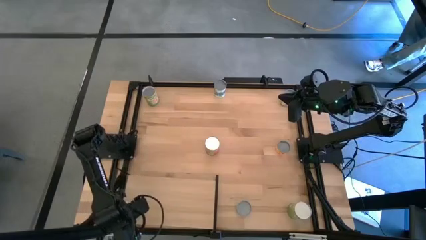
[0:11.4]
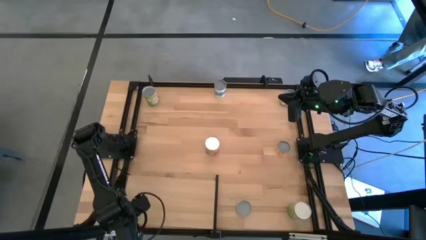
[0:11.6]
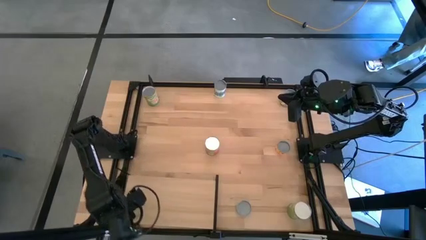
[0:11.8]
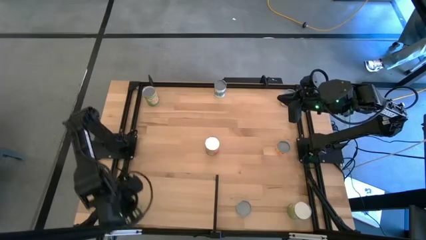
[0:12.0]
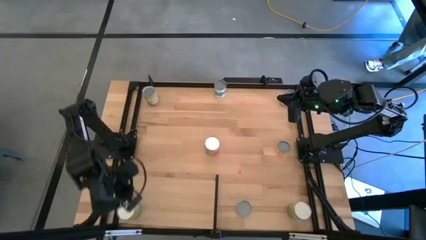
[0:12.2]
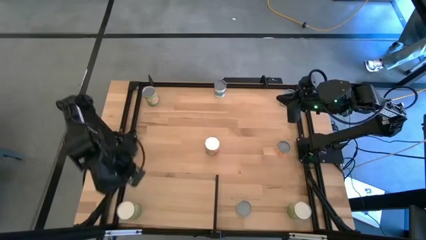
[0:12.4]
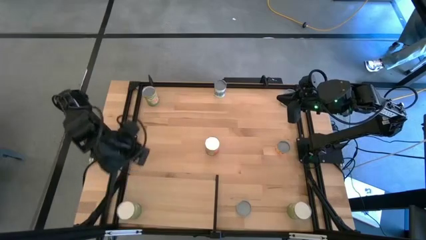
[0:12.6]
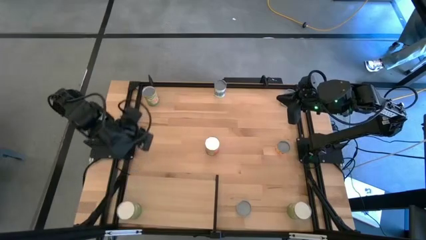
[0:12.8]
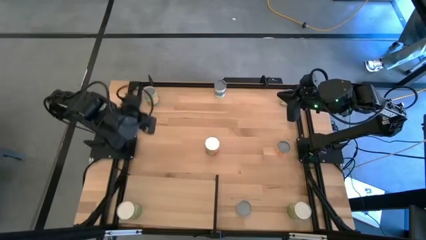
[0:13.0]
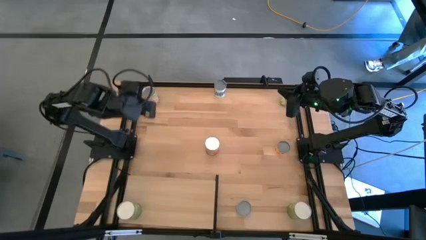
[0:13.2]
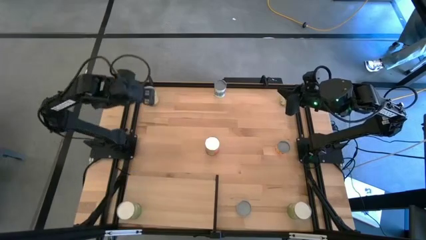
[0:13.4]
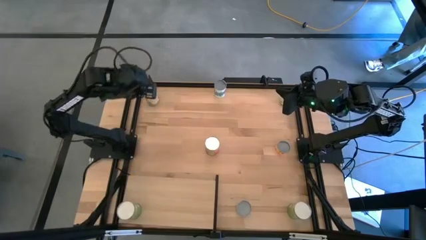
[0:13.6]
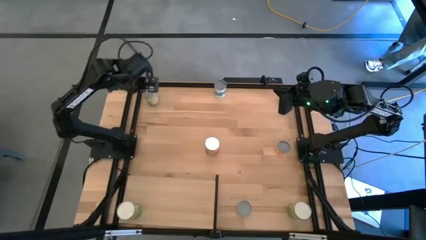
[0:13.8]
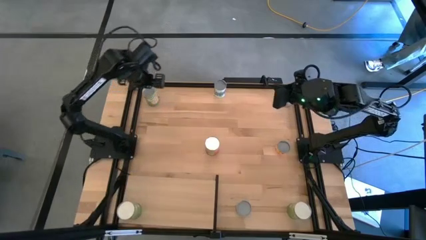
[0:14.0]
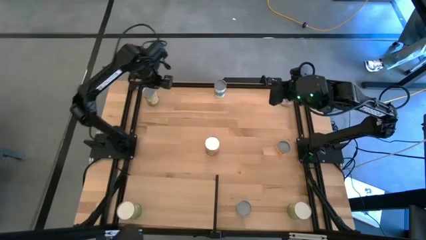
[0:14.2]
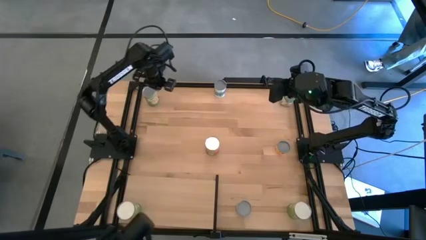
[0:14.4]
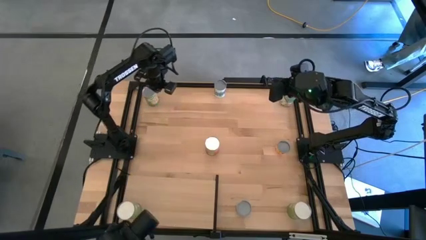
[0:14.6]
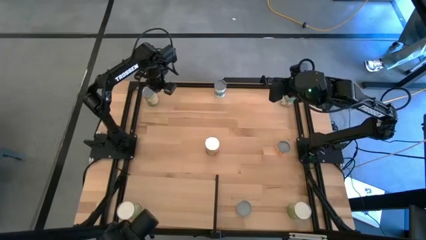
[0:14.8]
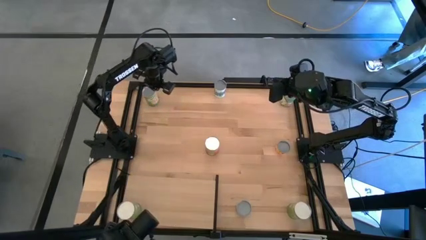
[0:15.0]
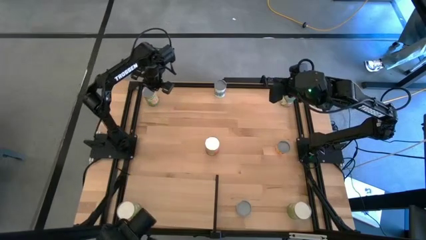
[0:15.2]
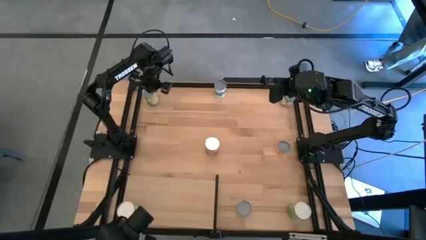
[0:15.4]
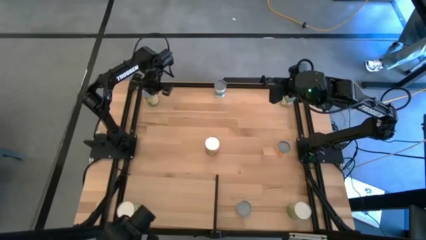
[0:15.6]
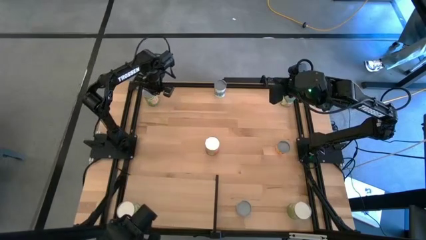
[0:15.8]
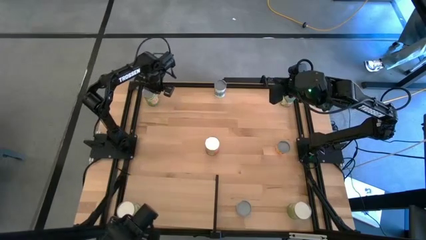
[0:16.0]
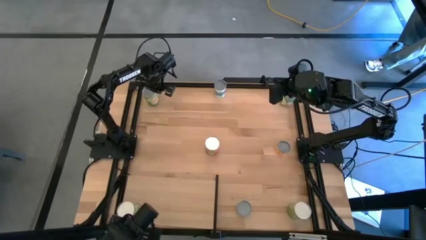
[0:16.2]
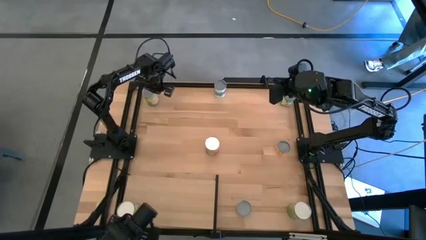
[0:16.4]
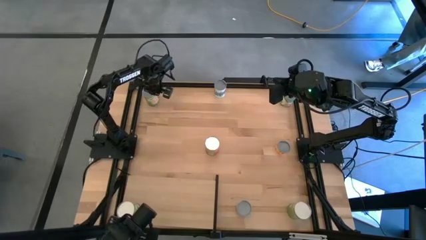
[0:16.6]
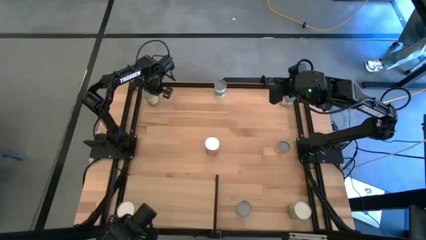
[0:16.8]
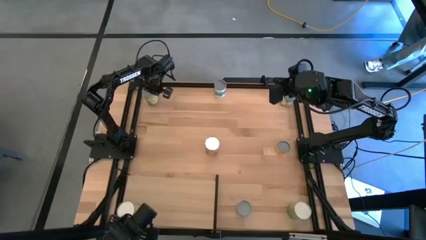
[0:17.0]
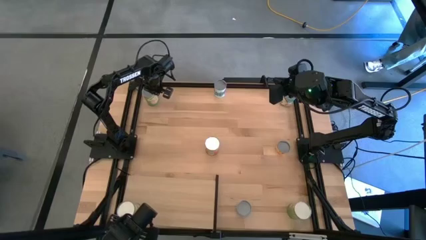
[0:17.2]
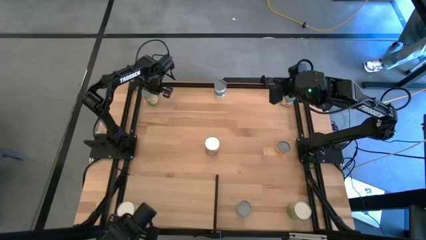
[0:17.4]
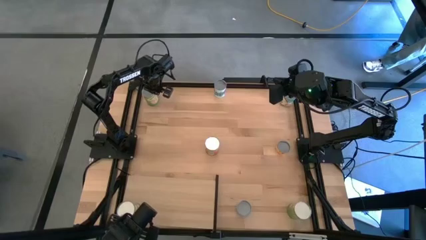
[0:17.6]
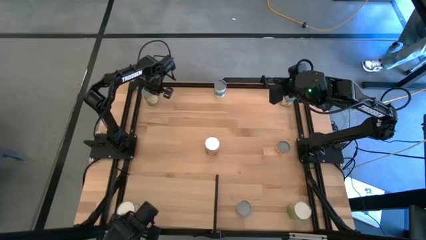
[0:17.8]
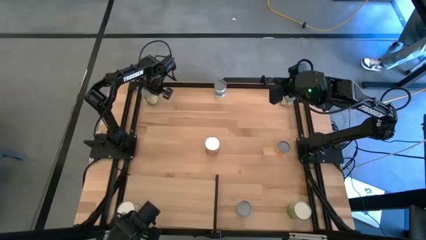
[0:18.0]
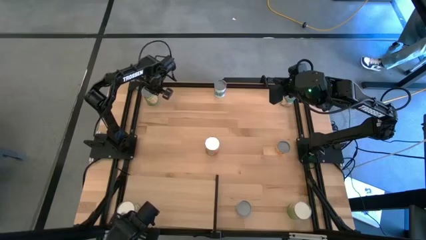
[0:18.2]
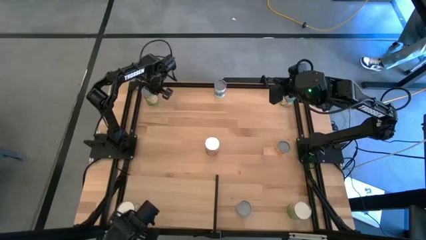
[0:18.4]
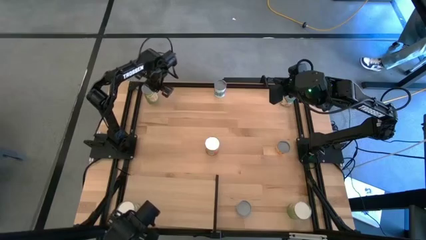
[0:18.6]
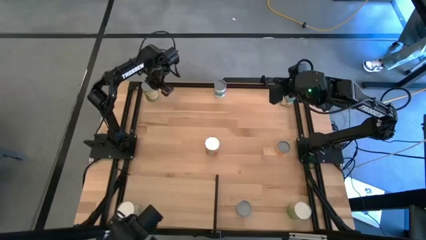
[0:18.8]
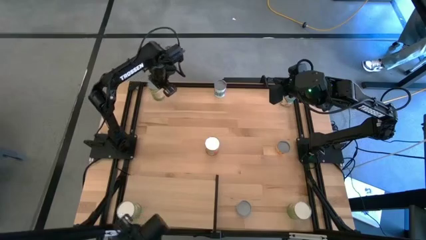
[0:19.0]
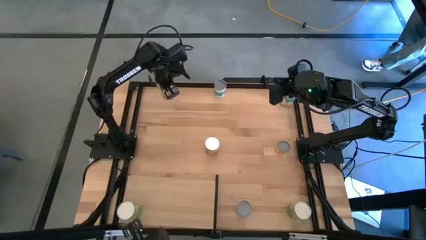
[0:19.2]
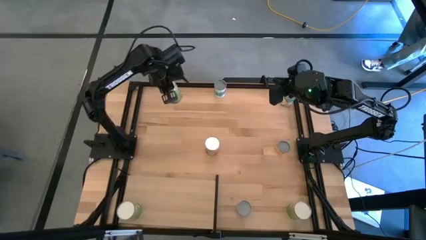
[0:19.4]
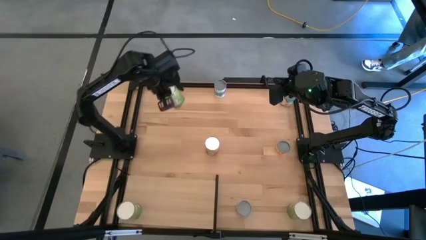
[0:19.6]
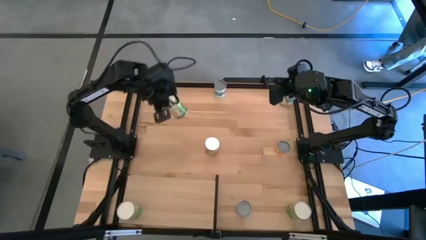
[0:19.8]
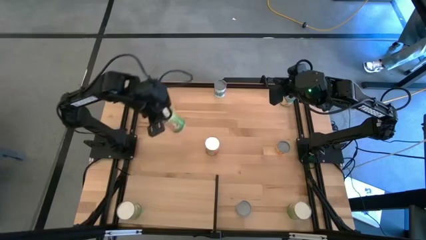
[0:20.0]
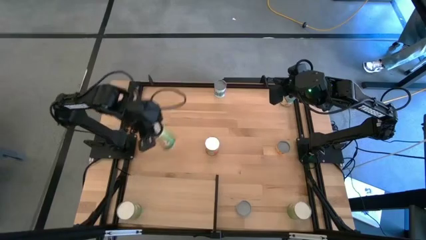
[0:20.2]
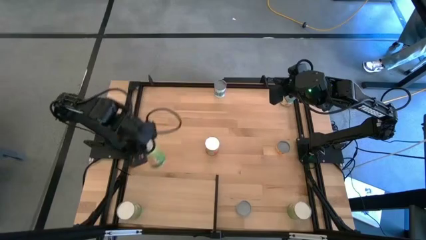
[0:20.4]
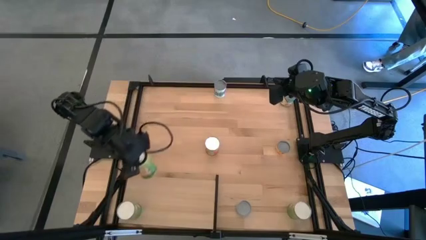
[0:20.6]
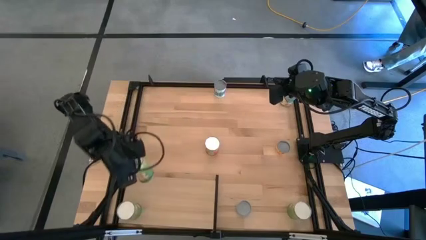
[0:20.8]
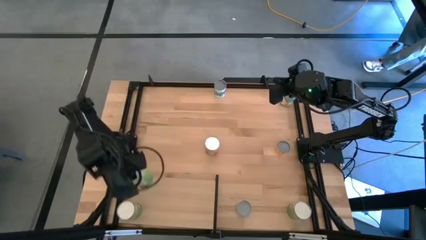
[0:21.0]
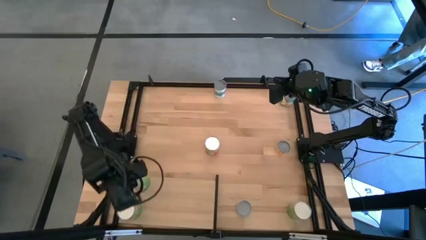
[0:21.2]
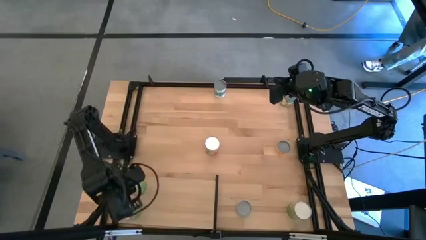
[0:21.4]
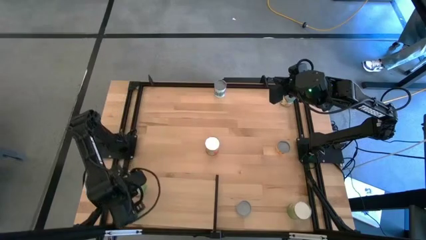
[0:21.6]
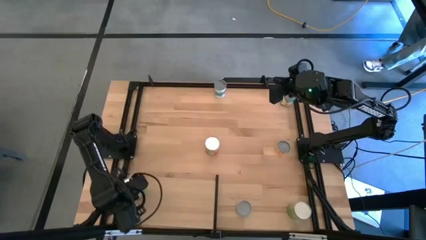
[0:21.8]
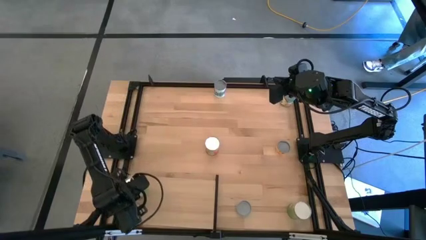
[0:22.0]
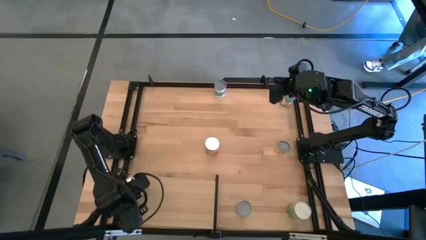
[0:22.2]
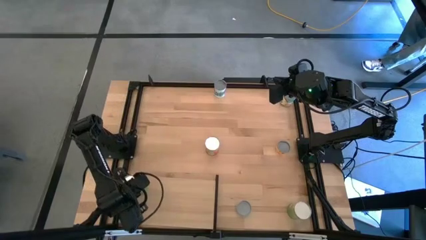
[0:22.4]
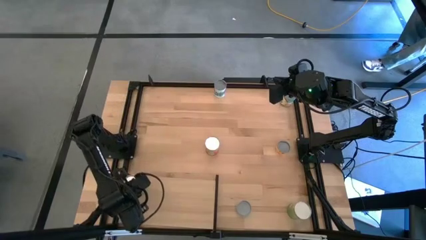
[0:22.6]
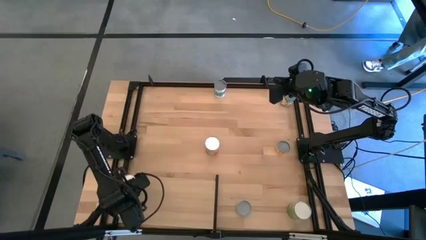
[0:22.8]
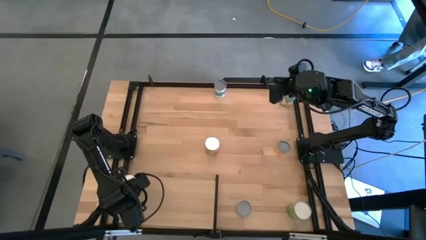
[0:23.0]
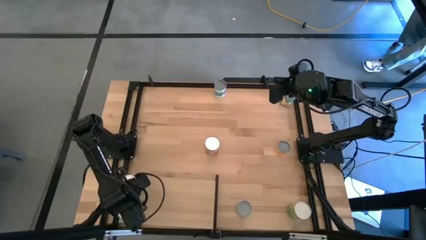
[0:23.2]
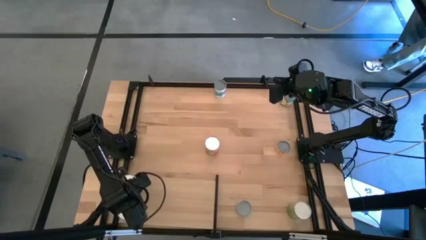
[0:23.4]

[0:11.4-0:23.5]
Task: Pick and place cans onto a shelf
Put the canned oranges on the shelf

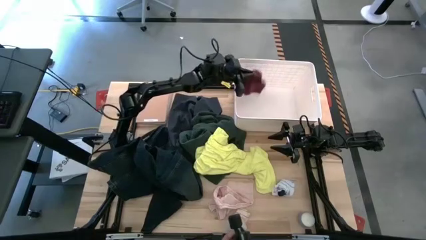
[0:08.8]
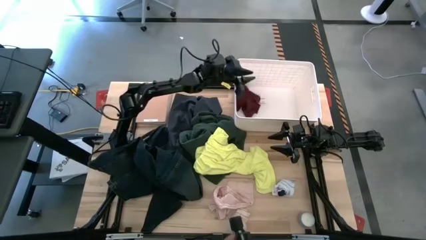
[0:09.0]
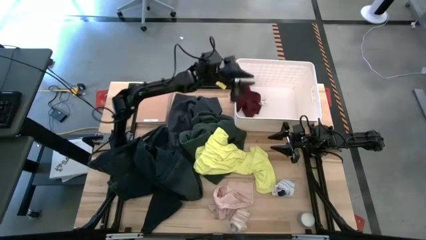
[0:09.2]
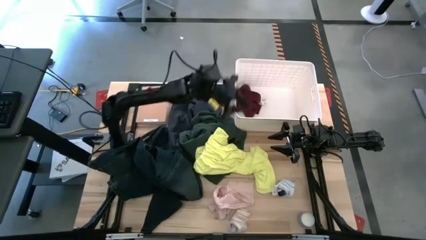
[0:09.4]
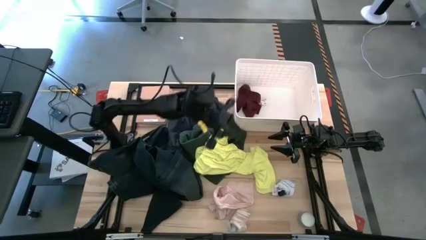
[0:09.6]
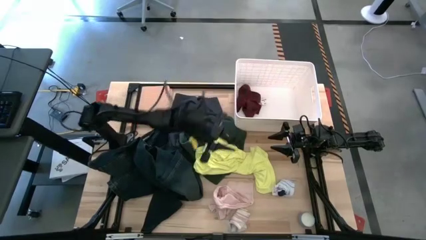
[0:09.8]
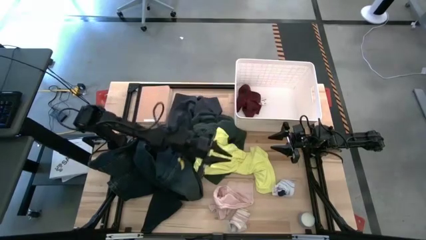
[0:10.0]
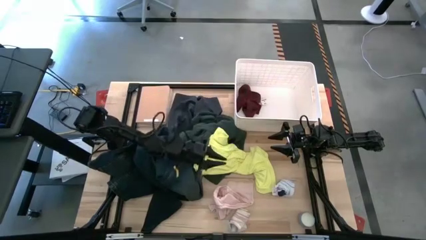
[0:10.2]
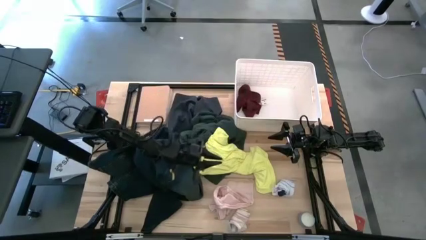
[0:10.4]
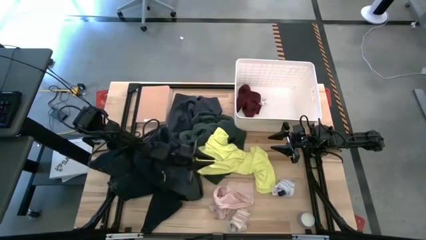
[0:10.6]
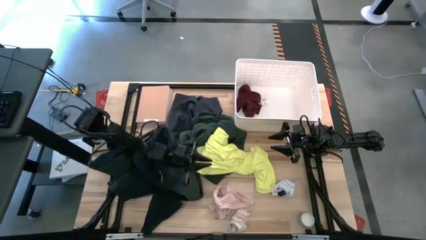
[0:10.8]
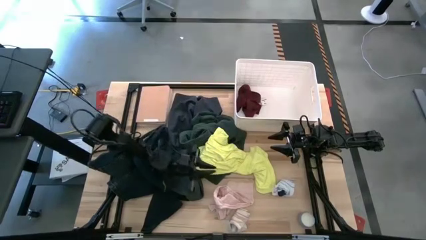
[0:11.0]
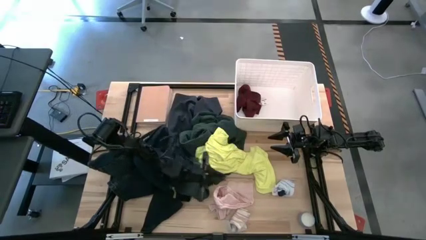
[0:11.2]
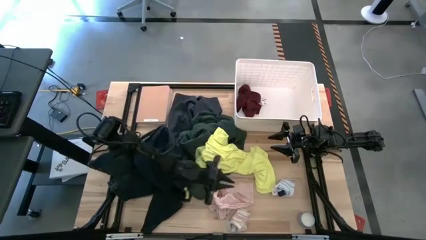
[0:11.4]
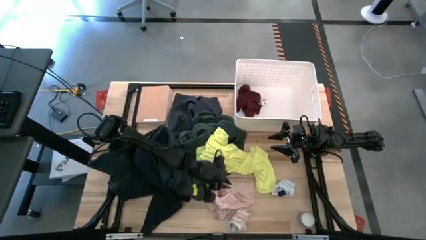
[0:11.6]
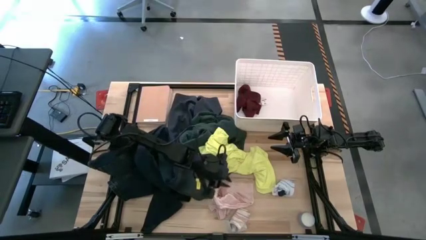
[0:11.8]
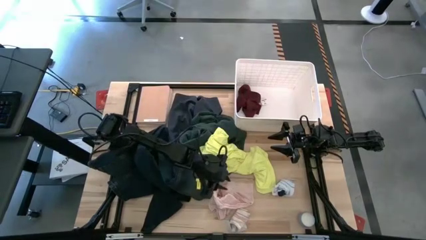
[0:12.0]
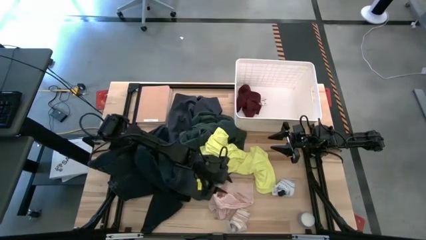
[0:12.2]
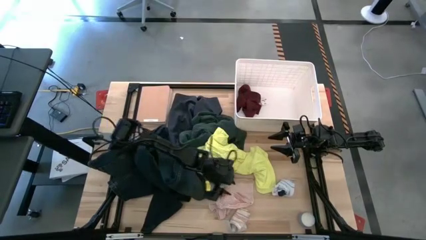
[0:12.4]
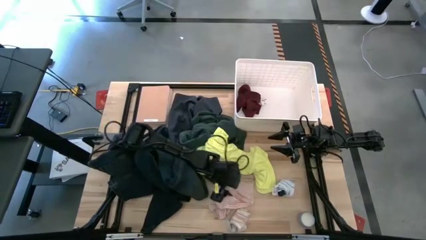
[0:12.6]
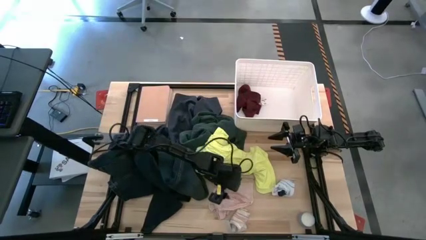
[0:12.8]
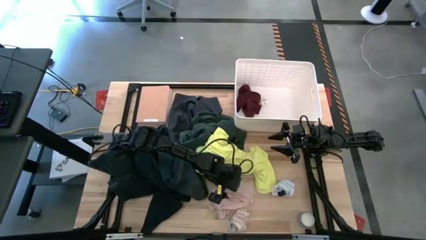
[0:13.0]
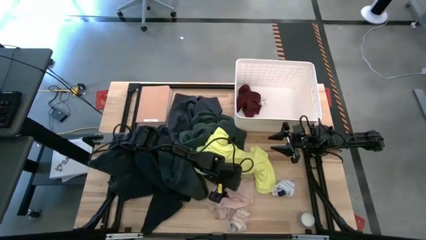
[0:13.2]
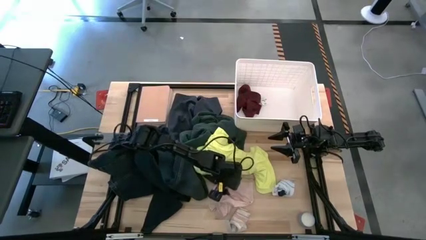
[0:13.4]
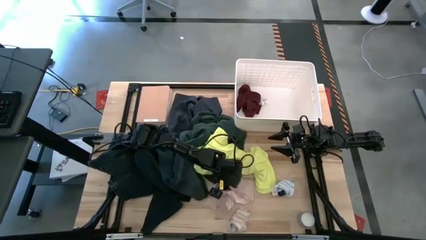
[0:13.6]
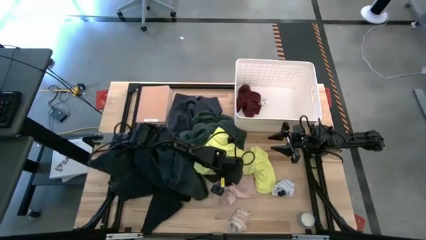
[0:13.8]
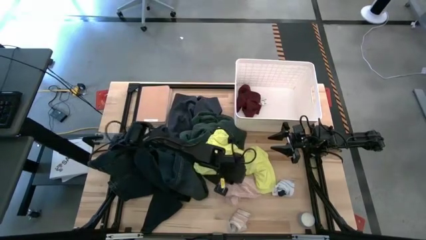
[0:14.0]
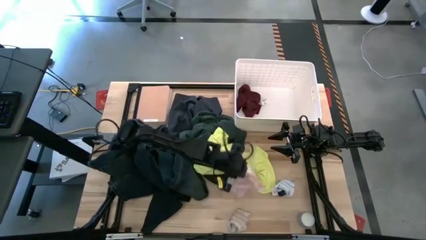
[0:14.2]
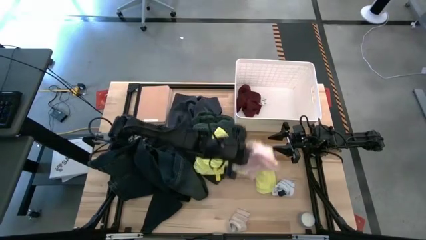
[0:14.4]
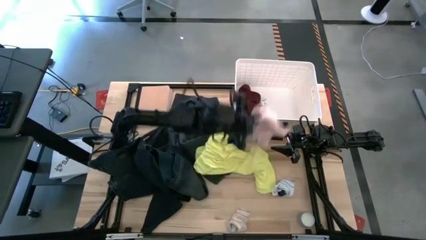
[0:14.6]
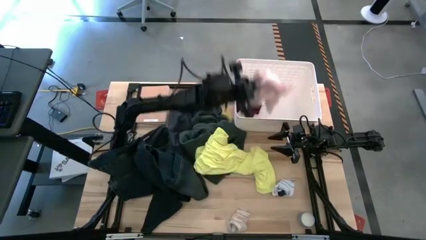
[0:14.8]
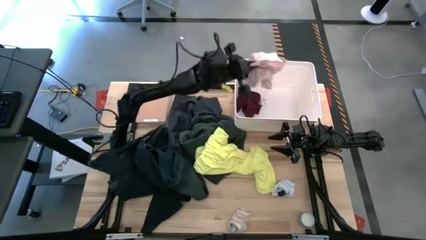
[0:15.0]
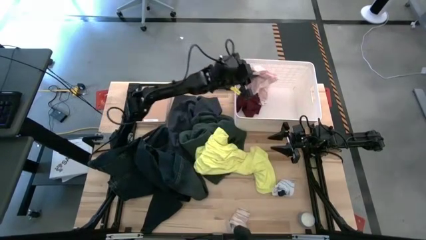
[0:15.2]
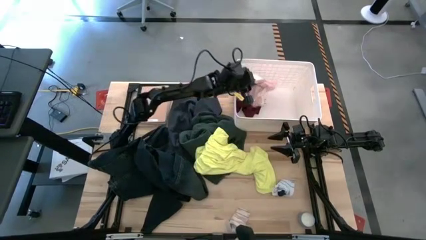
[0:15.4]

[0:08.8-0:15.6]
Task: Sort clothes
Put the pink underwear into the white laundry bin
